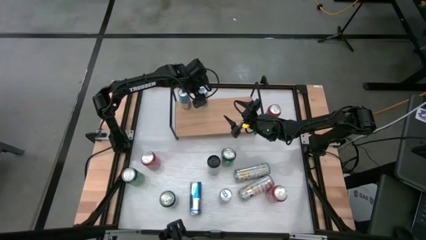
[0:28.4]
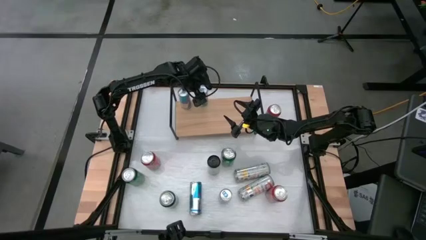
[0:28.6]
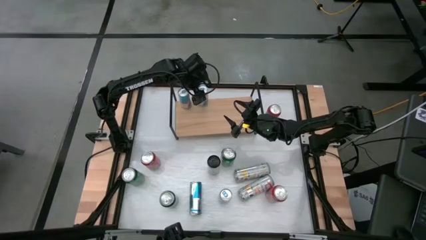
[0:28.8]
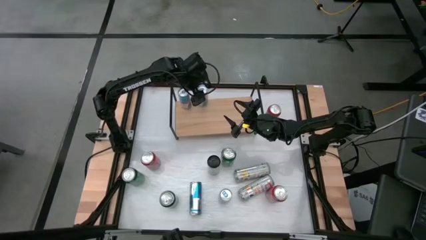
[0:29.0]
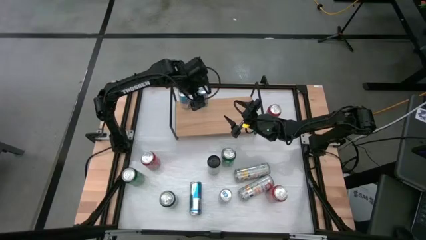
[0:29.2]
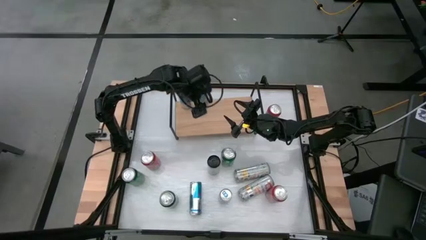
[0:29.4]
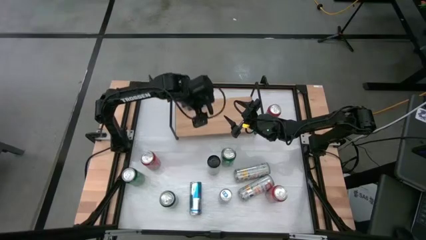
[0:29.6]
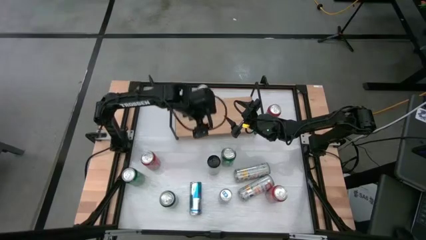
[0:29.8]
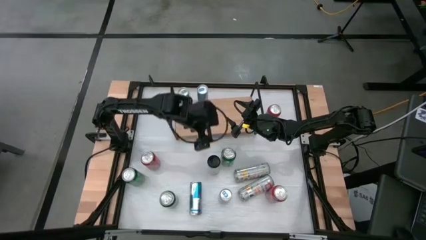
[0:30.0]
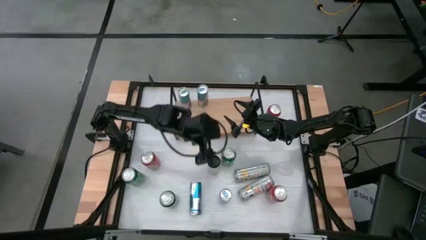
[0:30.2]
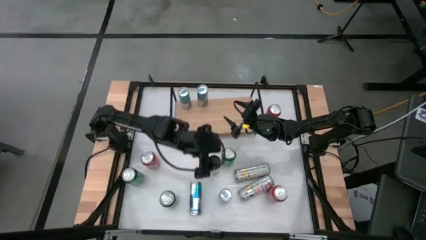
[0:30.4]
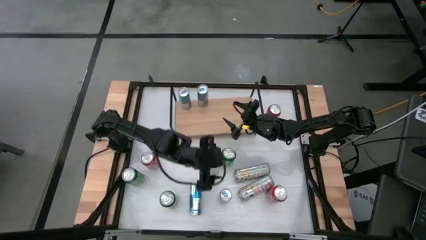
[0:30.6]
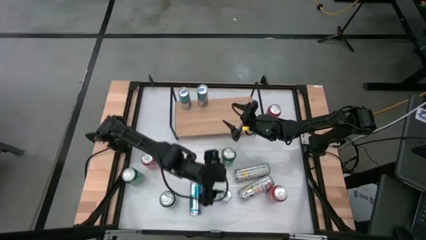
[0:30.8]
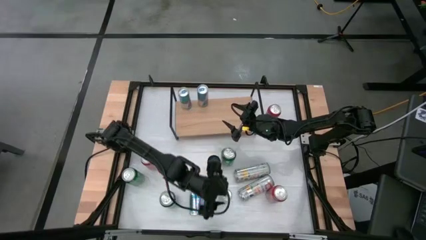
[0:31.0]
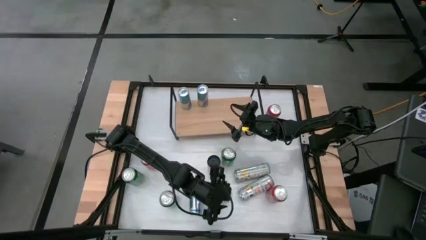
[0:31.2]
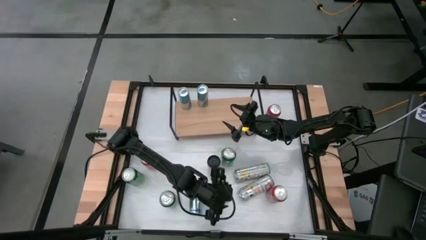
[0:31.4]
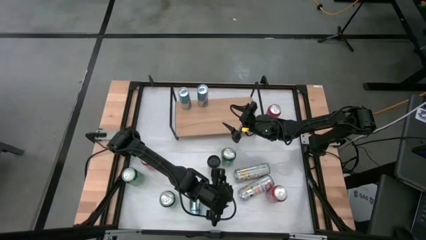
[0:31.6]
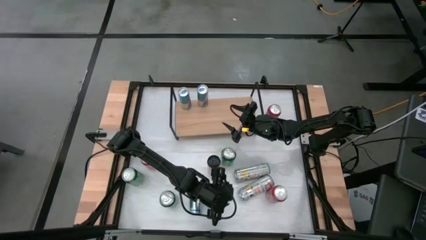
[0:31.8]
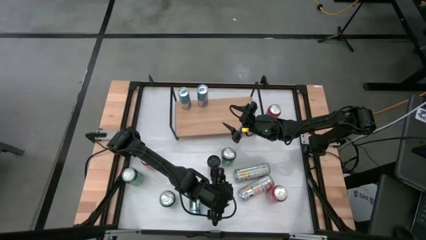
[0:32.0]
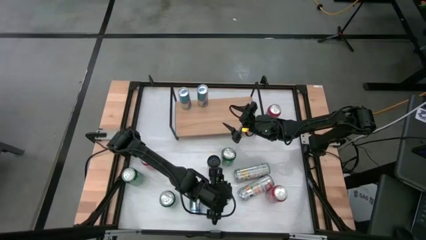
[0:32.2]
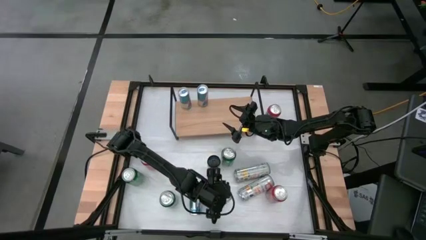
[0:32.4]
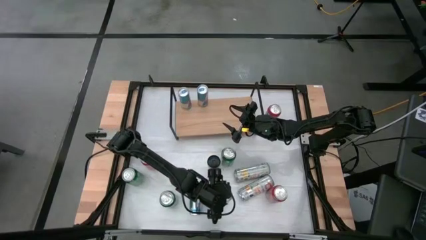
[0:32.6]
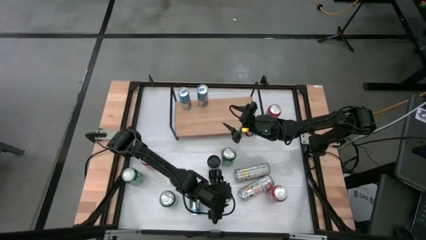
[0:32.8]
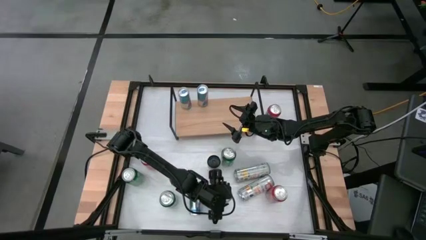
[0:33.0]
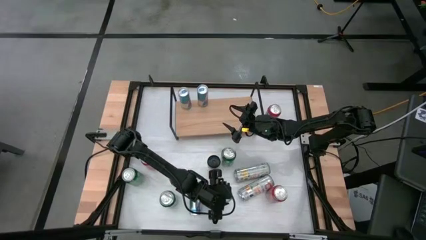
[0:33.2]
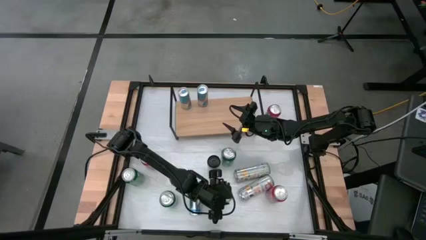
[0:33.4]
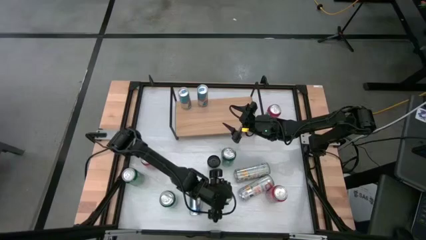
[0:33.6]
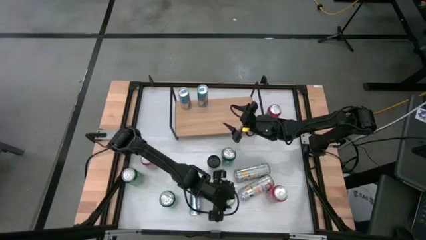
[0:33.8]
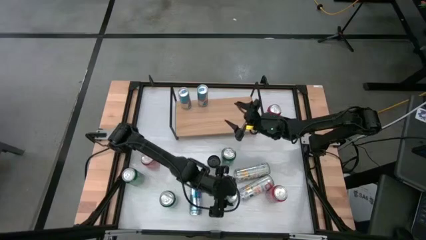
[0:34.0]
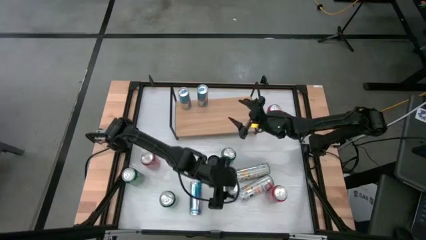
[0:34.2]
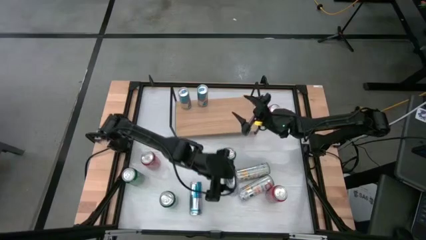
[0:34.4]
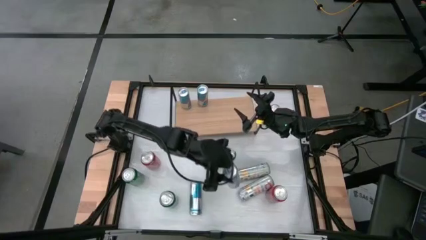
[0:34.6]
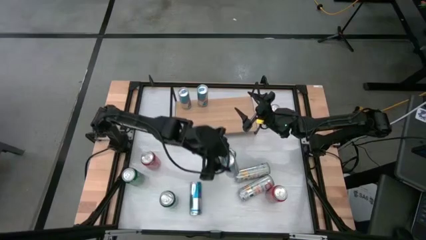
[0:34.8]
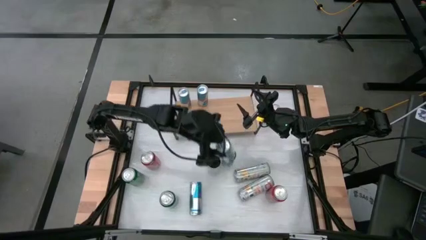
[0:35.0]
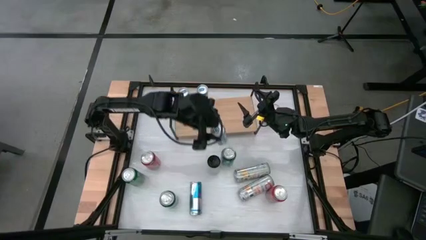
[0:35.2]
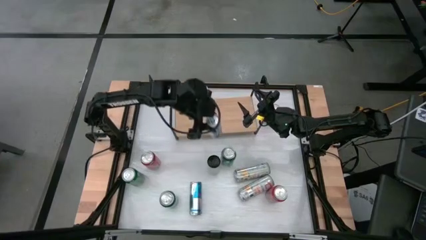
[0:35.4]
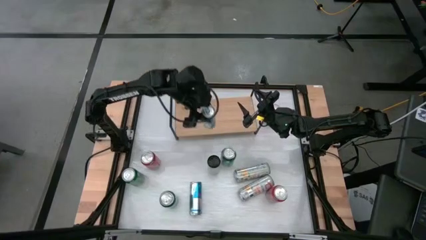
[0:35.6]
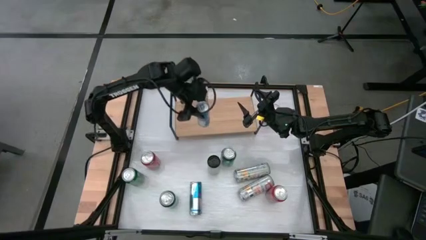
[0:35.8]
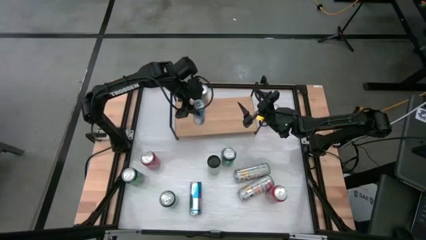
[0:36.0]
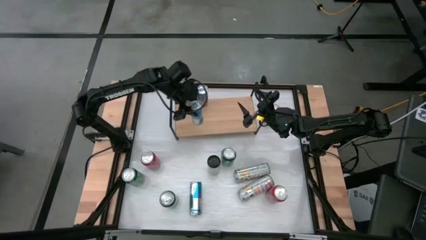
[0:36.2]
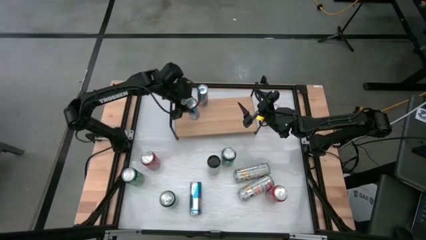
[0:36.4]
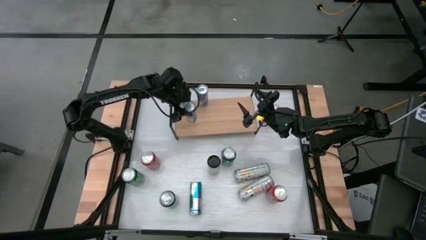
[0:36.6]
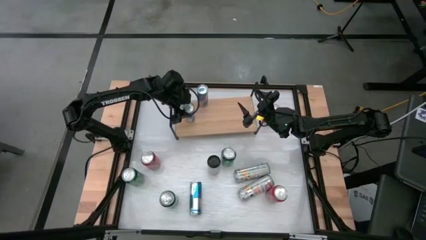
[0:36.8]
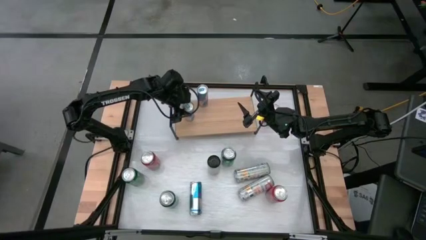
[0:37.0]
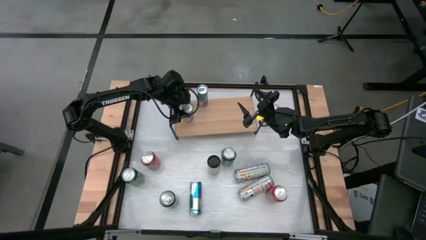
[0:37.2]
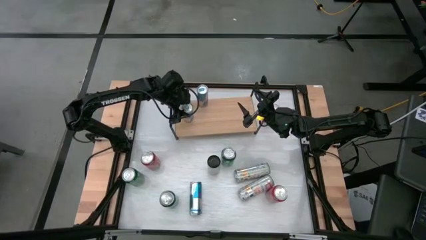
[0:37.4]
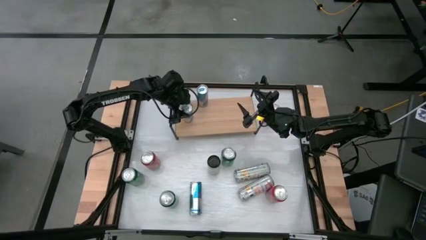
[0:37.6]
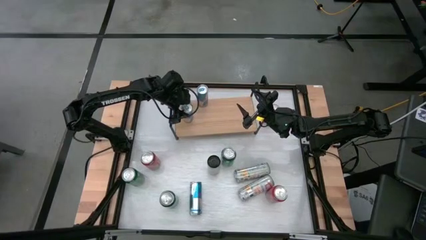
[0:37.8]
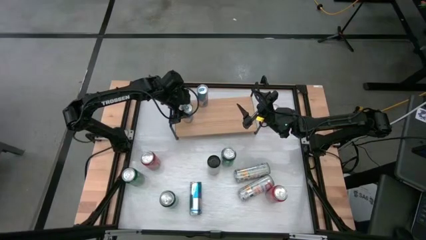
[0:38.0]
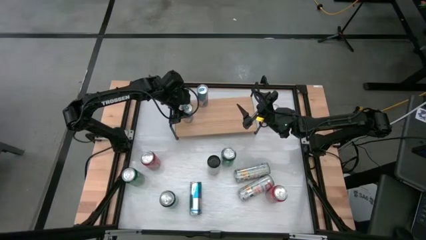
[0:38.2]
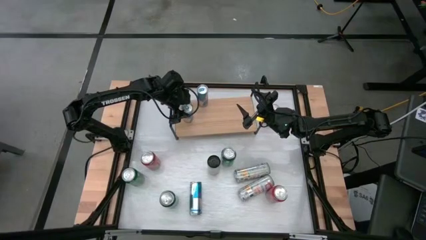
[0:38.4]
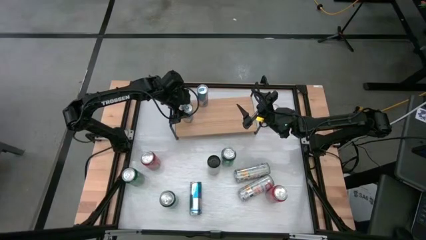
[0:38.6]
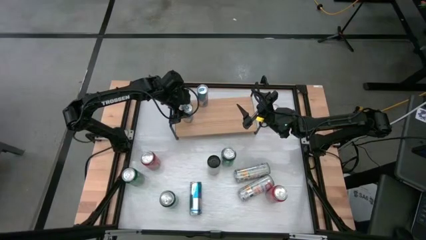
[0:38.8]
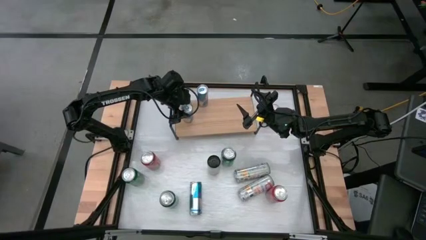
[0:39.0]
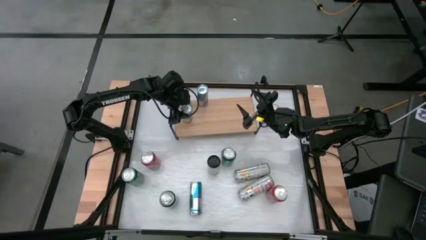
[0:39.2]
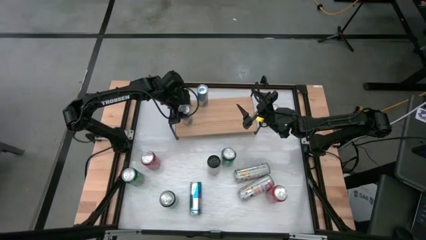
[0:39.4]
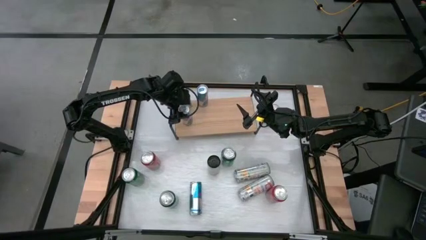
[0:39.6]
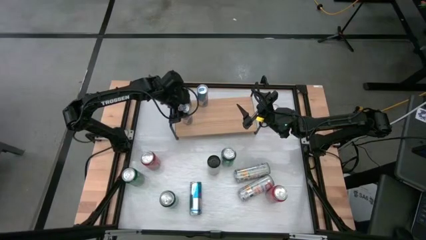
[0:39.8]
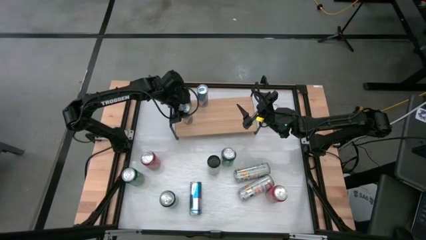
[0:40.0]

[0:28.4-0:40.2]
Task: Sort soda cans
Put the blue soda can on the shelf and align with the other blue soda can
